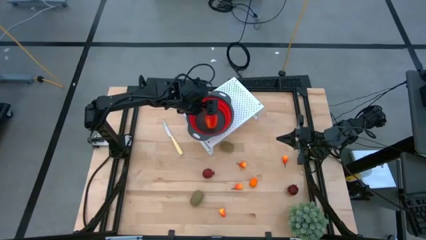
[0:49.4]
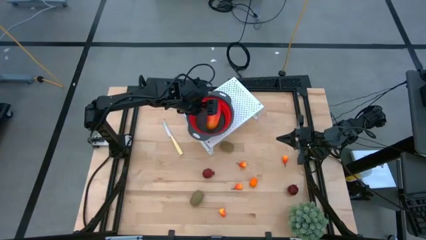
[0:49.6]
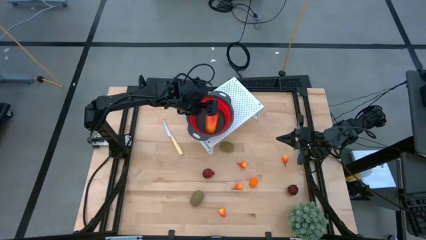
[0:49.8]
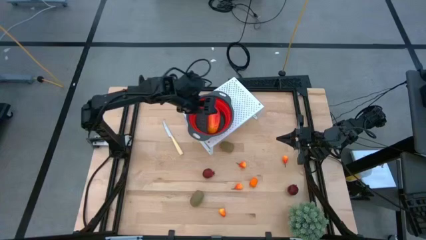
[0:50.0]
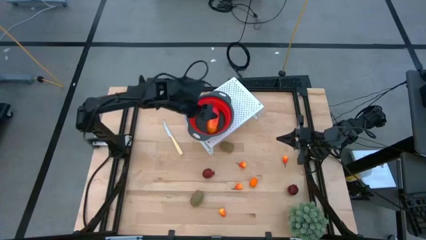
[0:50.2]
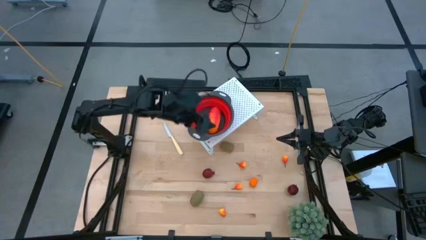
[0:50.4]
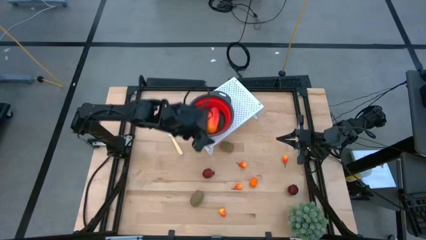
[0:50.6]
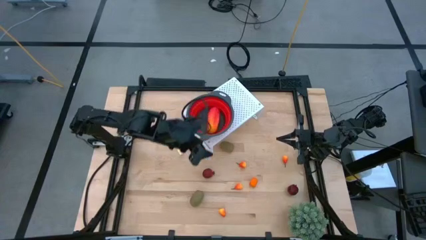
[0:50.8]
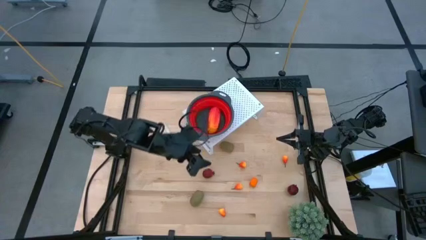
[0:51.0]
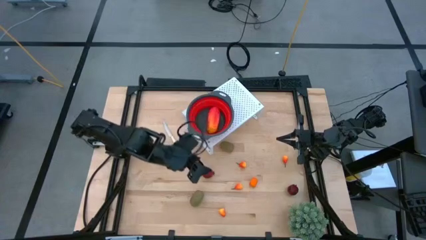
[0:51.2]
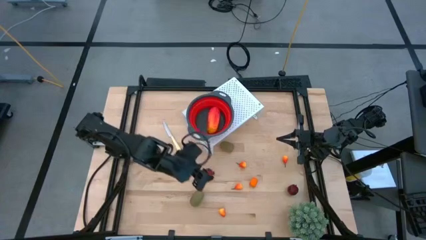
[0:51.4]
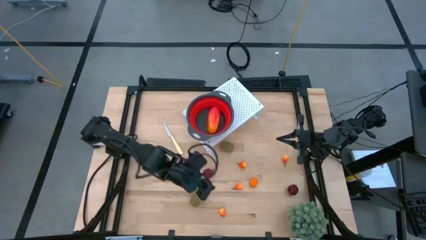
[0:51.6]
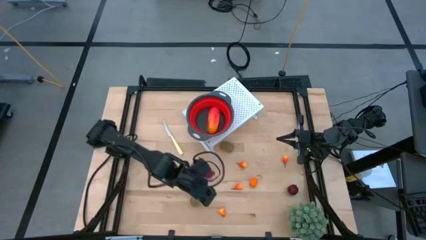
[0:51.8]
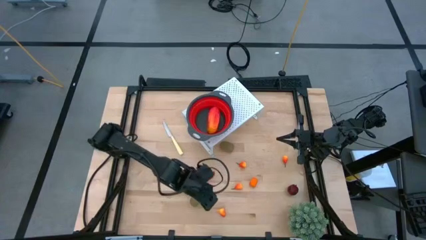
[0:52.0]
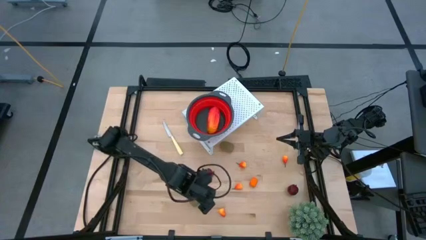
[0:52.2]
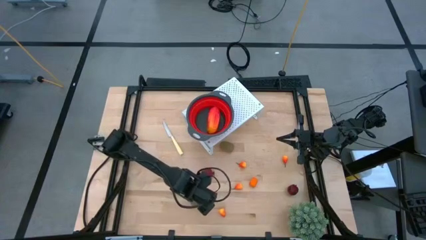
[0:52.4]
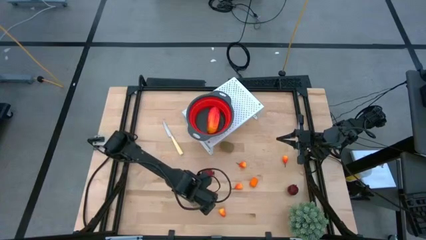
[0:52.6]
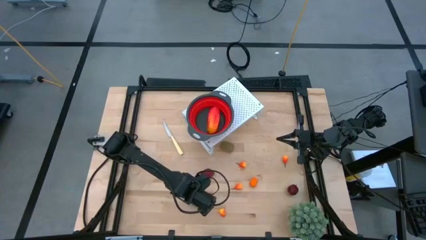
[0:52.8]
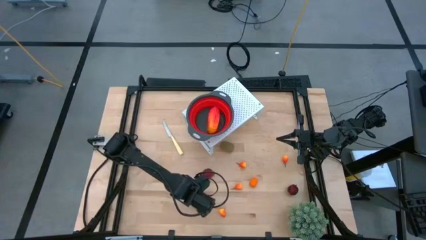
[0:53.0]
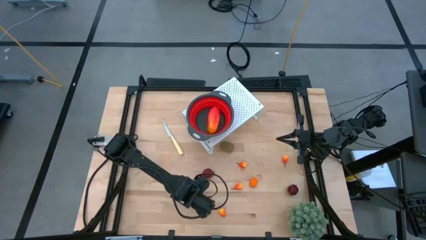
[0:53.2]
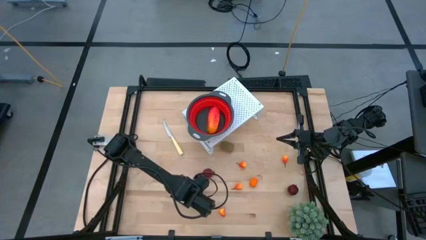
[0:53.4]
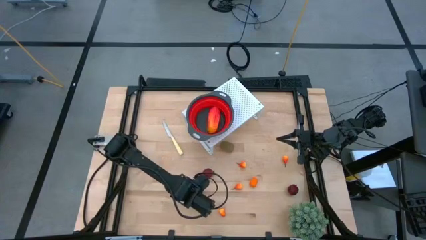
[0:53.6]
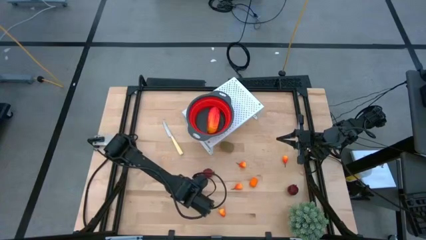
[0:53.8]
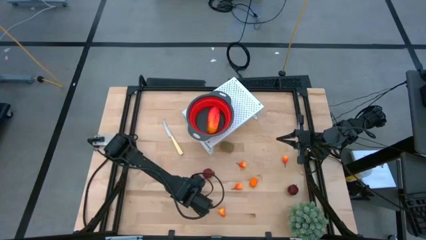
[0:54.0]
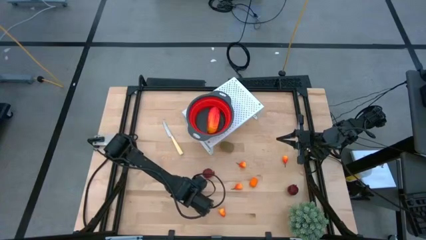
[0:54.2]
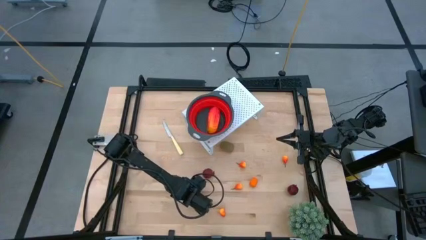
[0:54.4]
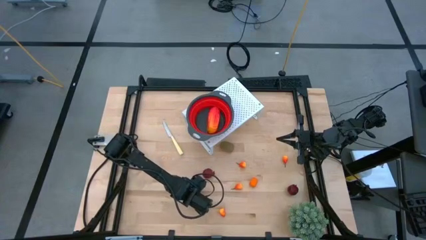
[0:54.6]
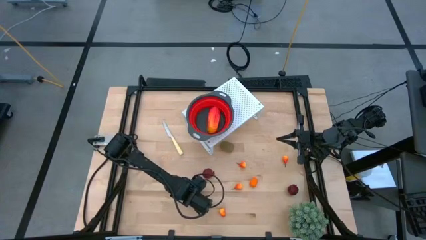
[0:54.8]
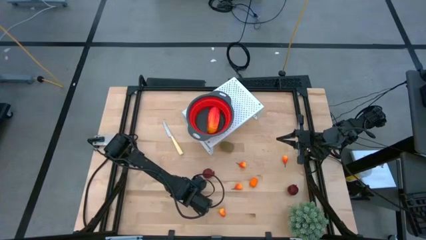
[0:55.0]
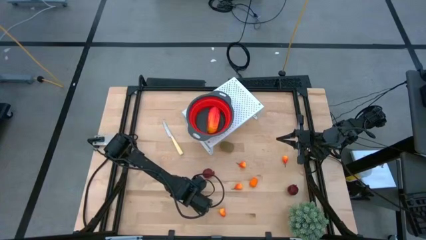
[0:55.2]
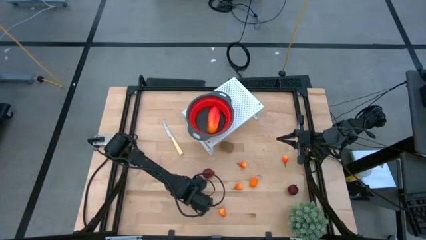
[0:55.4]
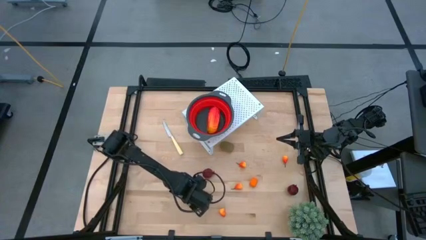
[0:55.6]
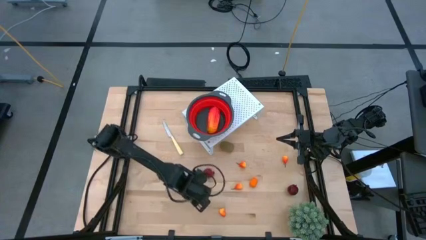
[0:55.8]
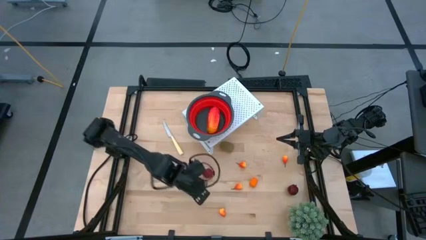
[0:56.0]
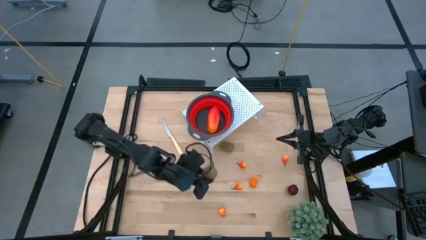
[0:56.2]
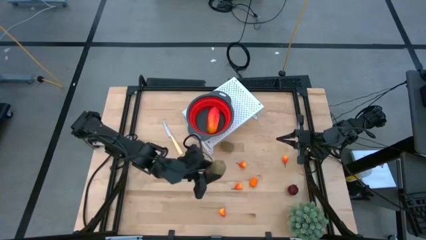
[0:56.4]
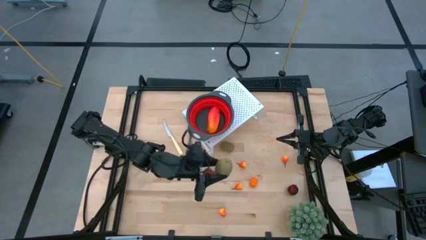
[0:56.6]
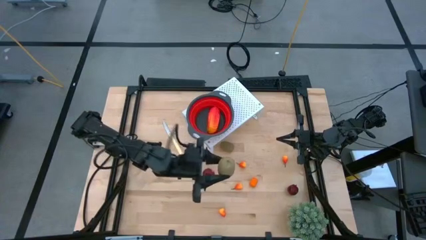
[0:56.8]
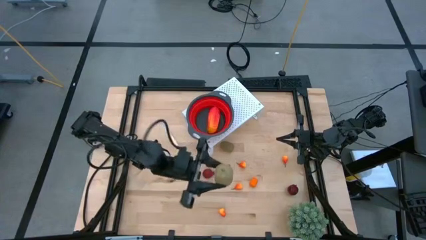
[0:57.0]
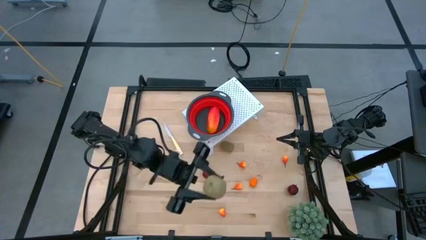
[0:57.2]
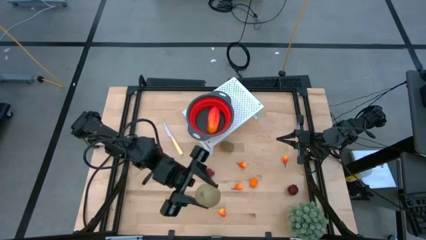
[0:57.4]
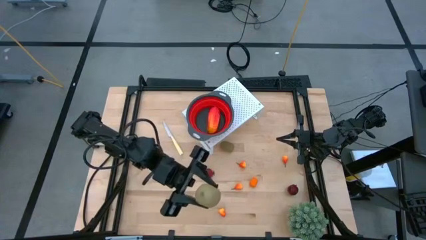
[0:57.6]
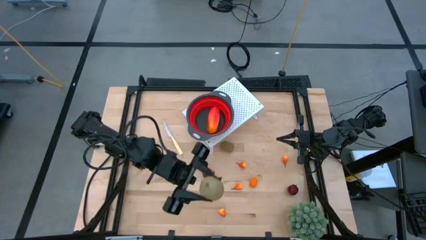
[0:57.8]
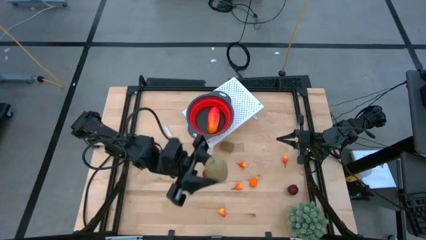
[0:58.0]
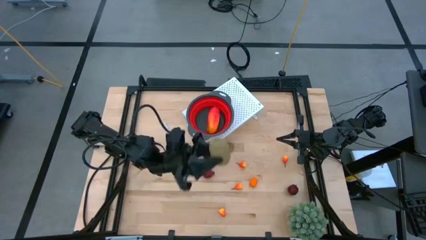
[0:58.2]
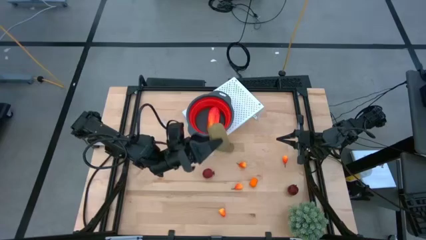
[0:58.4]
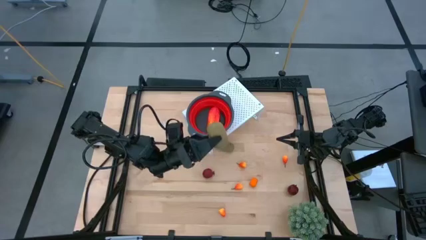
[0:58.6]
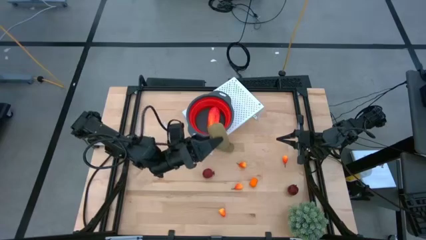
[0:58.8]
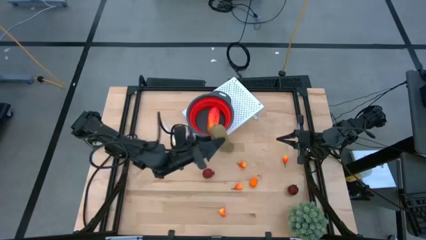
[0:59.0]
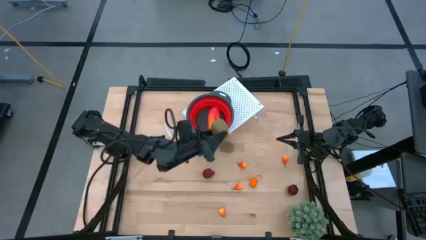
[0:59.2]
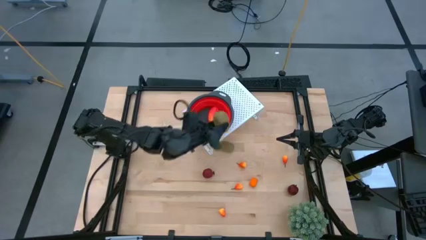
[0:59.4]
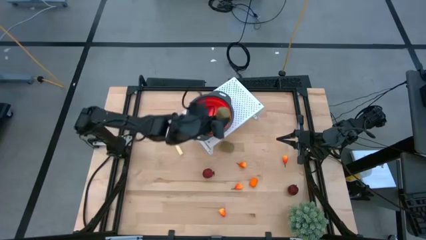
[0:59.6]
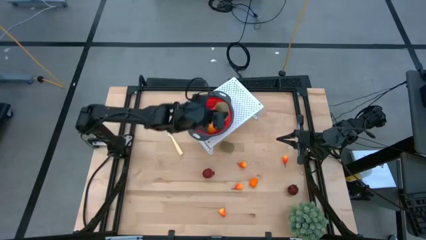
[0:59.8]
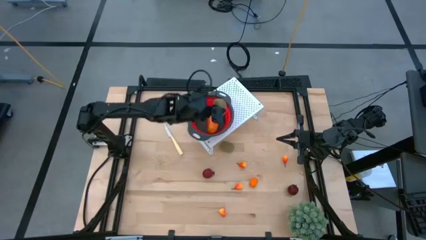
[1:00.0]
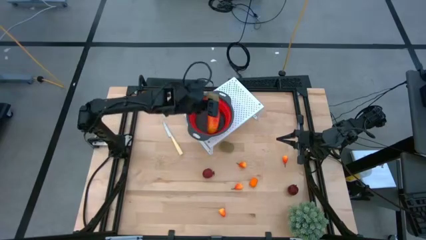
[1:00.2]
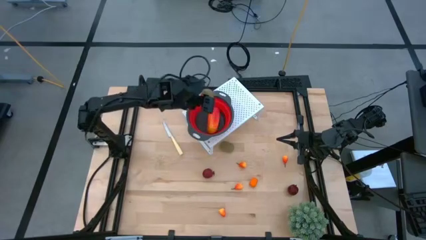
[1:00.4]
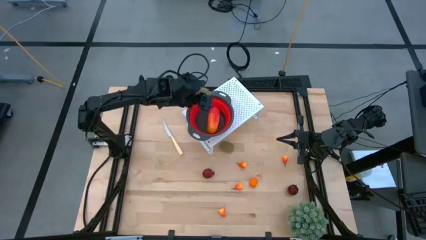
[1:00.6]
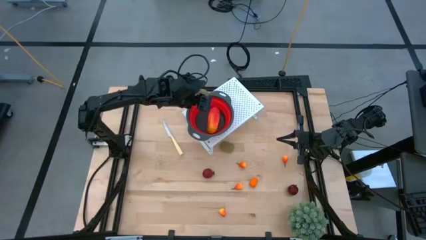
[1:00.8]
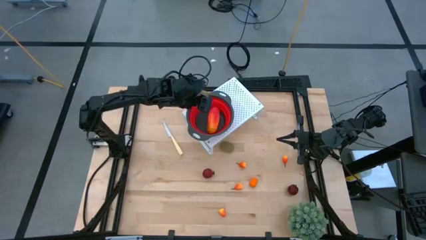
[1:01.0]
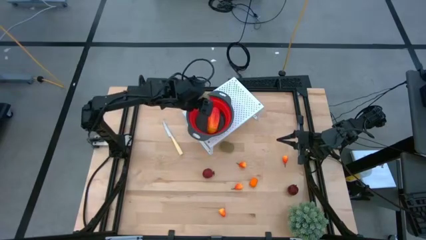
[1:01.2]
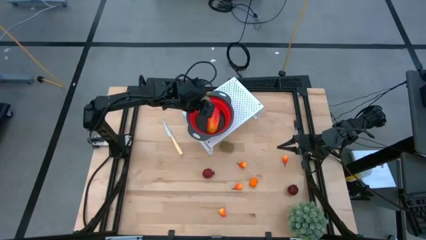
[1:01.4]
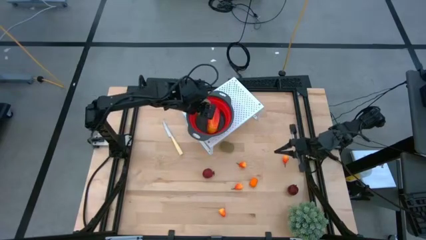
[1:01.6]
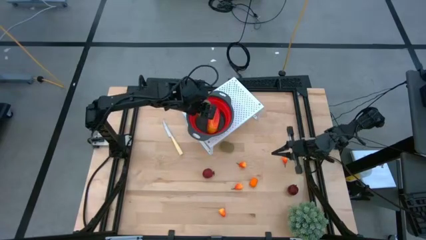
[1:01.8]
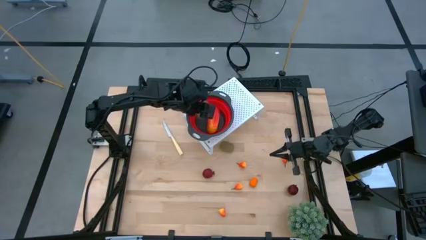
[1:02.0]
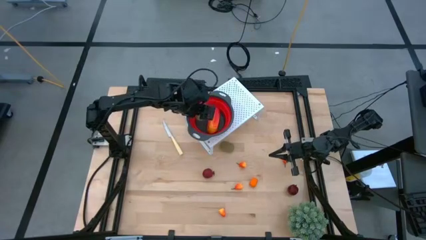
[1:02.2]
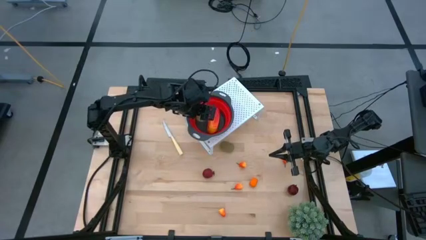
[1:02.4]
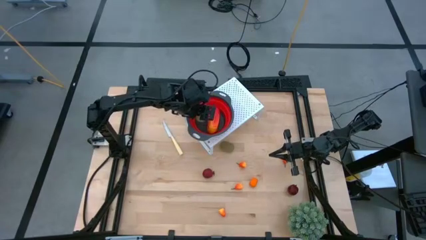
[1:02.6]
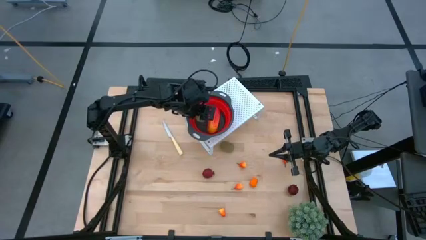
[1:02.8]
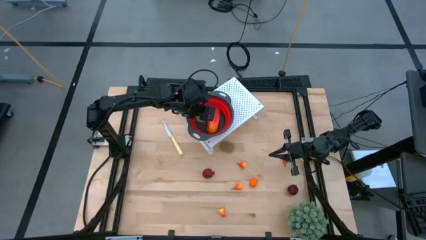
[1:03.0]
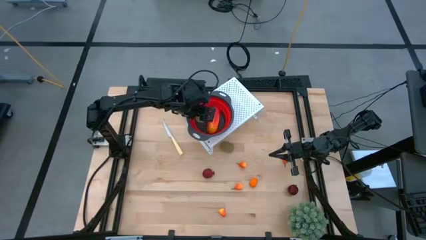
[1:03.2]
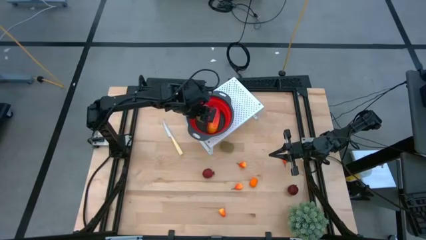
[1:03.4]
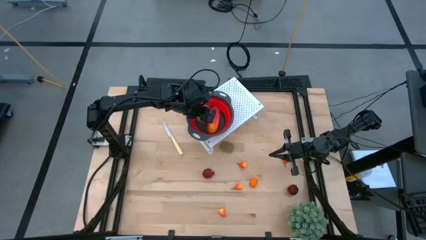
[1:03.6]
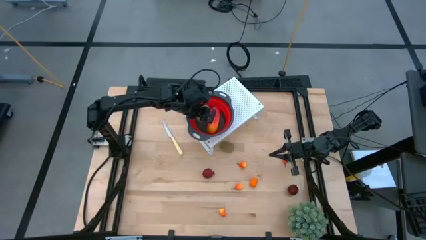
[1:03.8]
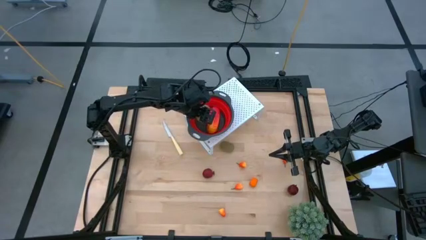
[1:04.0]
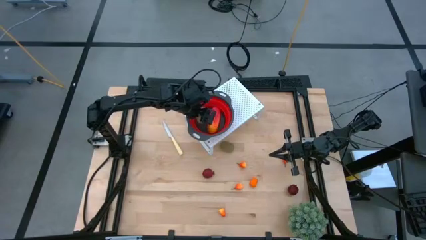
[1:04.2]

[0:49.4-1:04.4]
Task: Pick & Place Fruit
Put the kiwi into the red strainer bowl on the shelf
